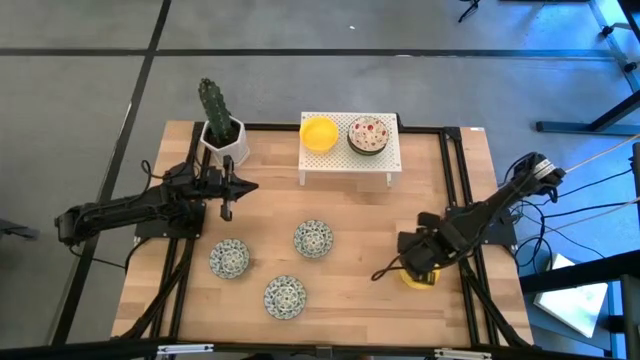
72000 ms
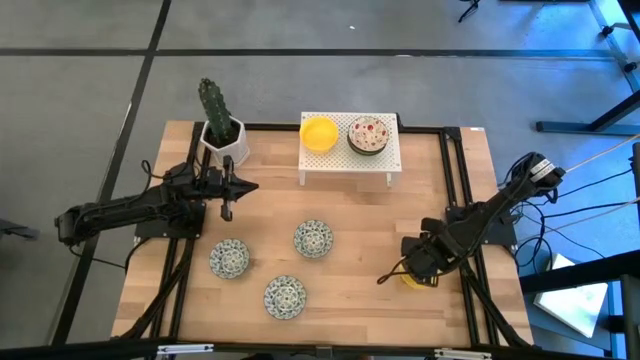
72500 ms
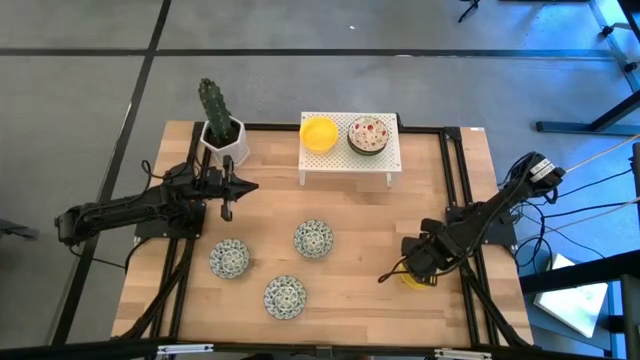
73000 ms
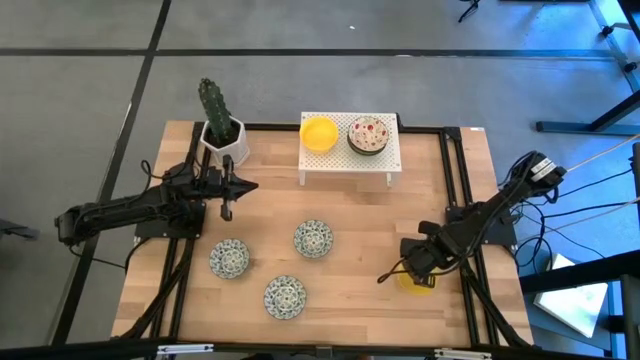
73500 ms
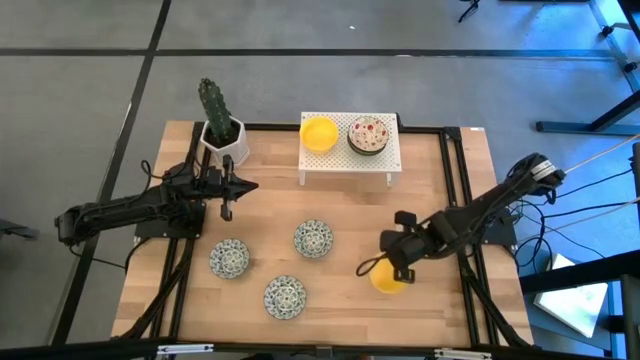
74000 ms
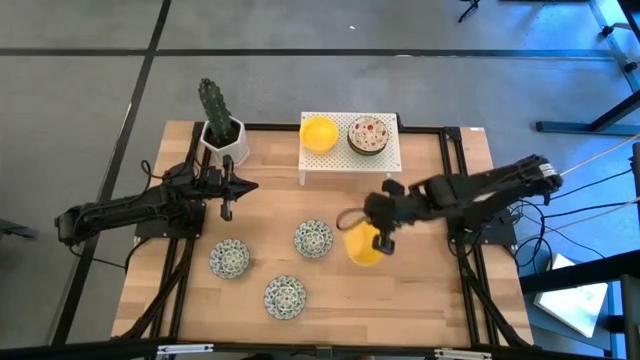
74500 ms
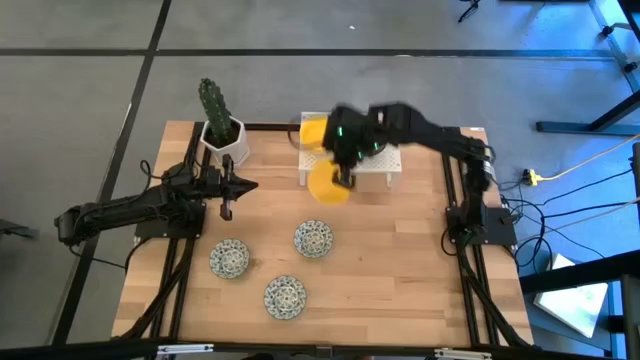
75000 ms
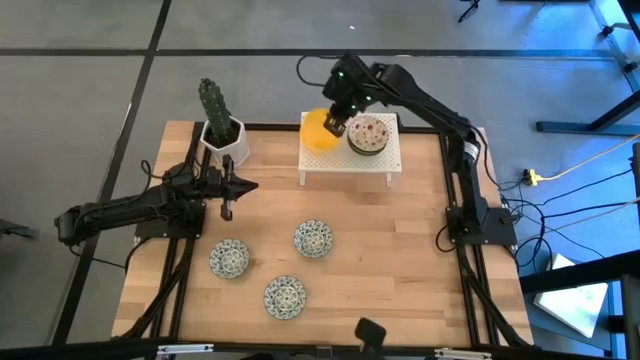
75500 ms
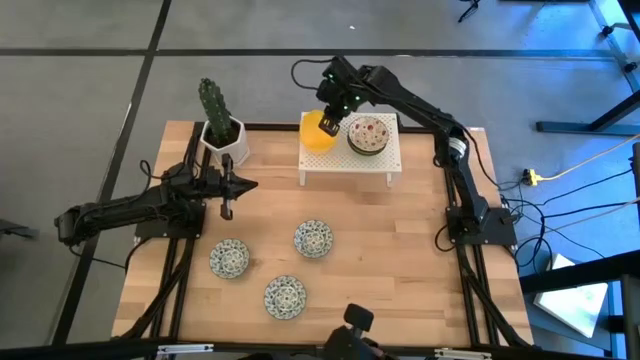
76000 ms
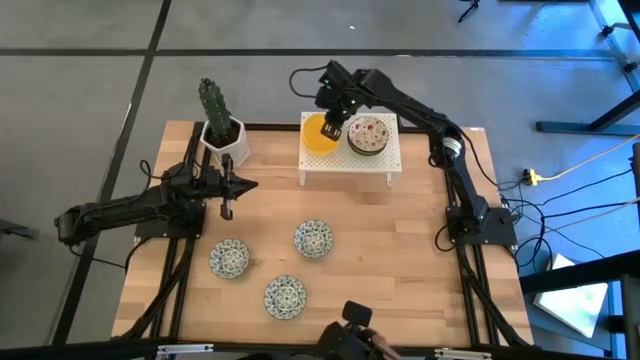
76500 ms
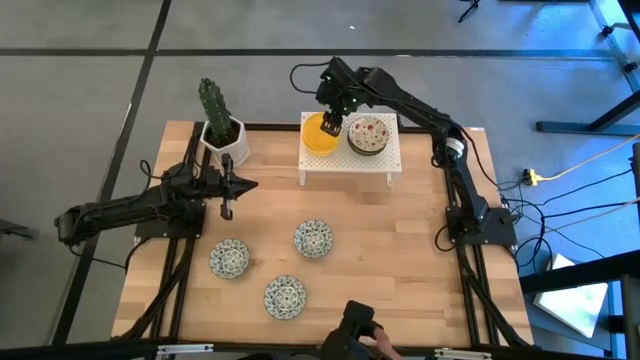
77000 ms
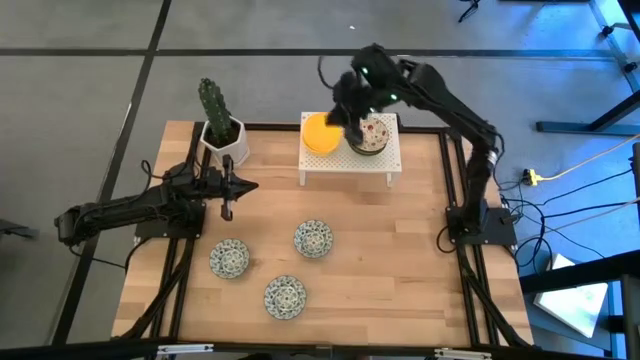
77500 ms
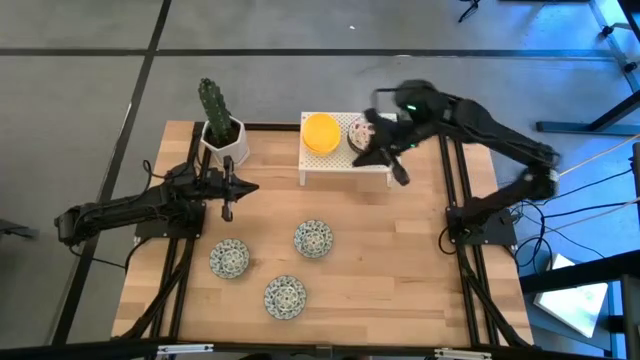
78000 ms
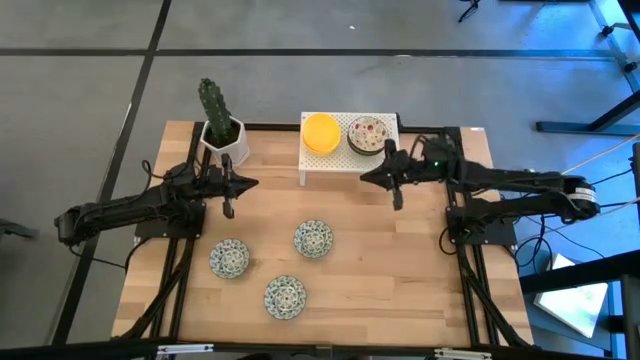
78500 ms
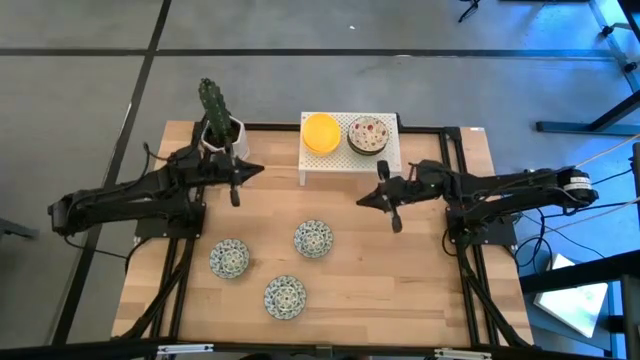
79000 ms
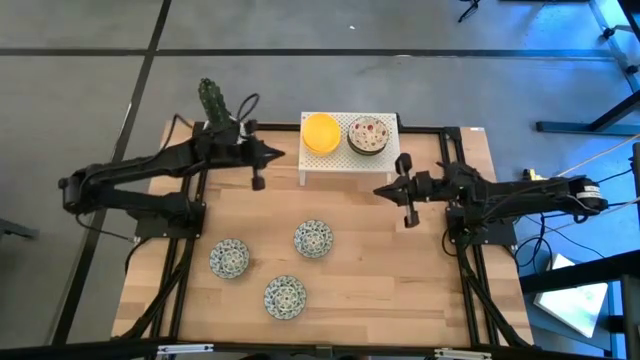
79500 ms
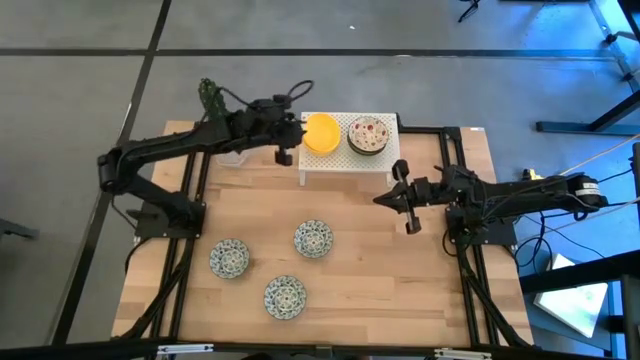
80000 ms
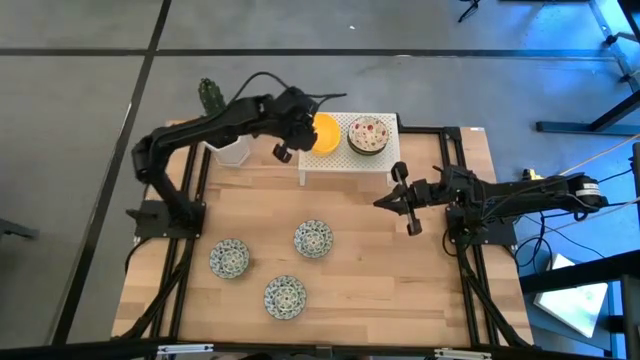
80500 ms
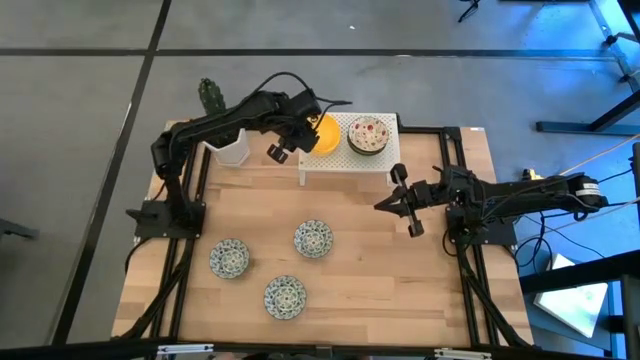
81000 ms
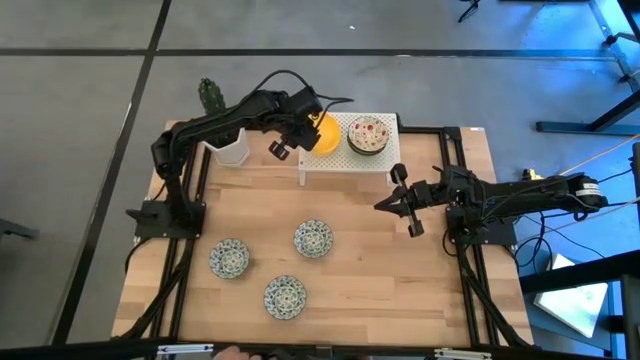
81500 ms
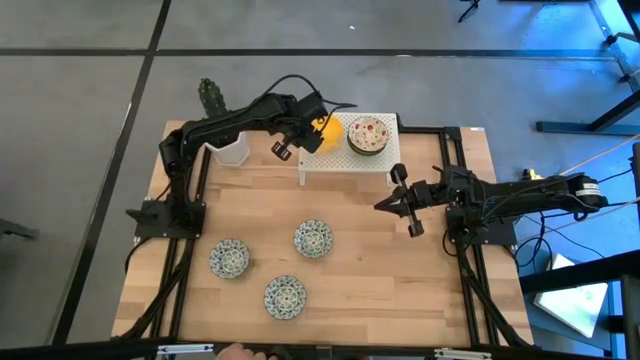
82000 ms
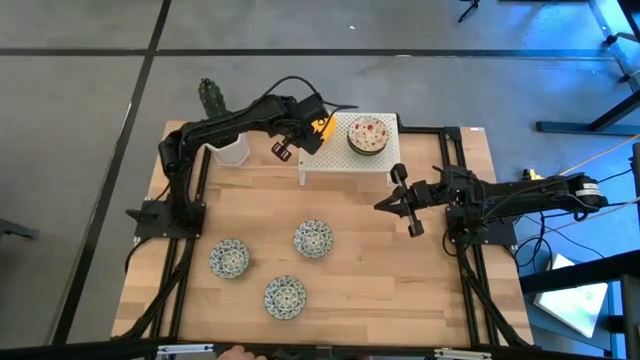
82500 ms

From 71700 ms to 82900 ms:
Task: Pick & Place Mini bowls
Stack the yellow bowl on top of the yellow bowl on the shelf

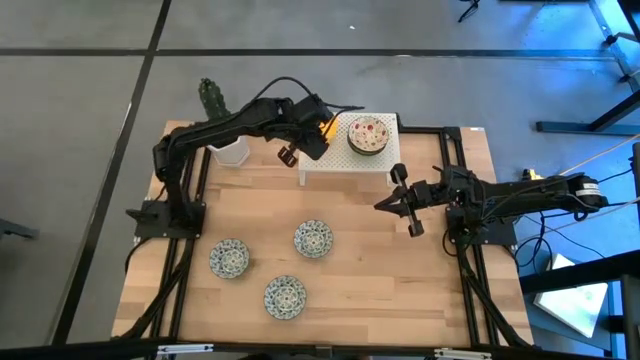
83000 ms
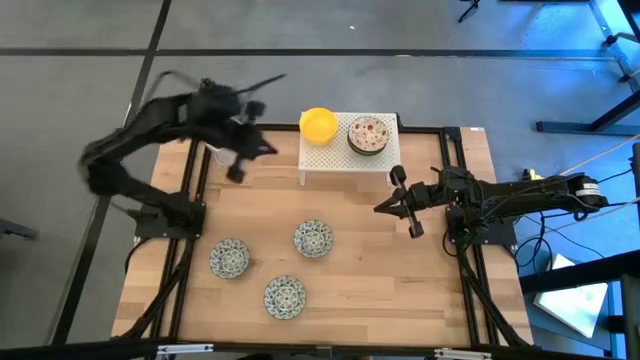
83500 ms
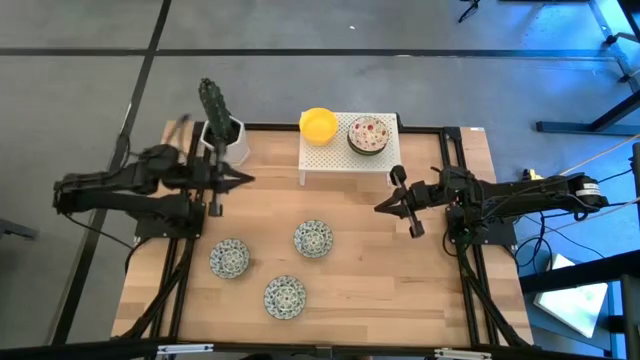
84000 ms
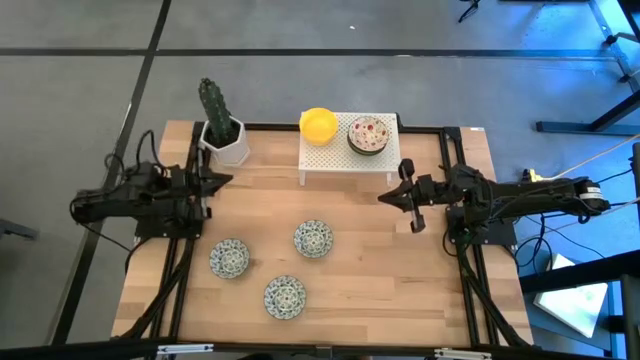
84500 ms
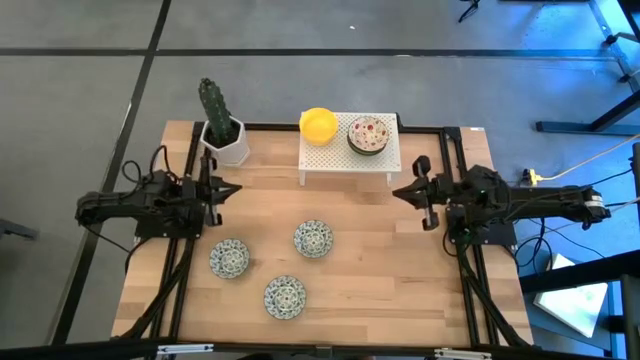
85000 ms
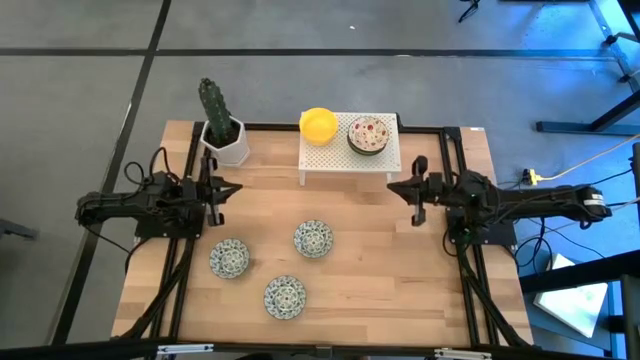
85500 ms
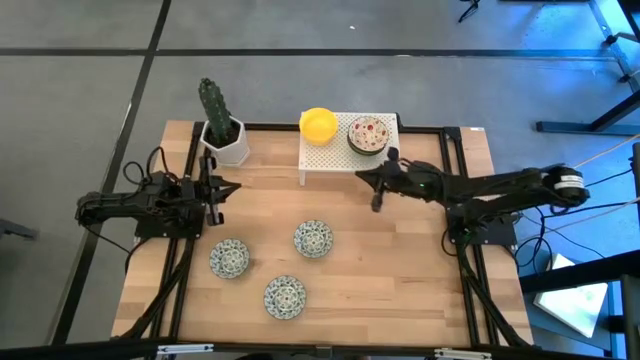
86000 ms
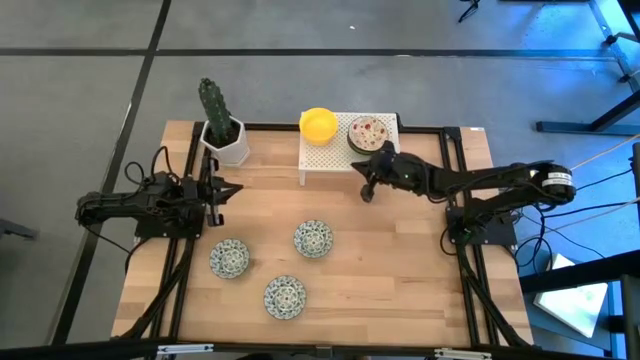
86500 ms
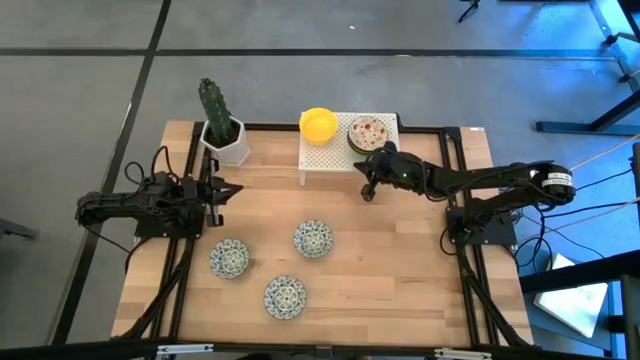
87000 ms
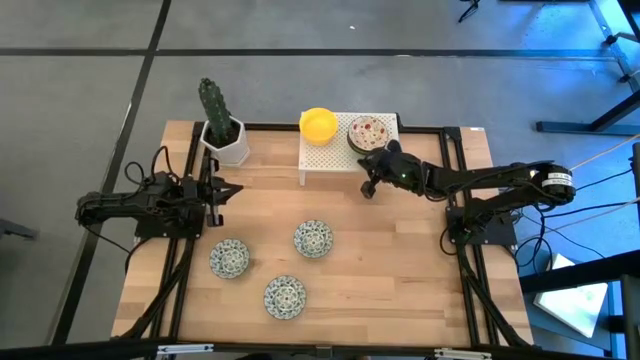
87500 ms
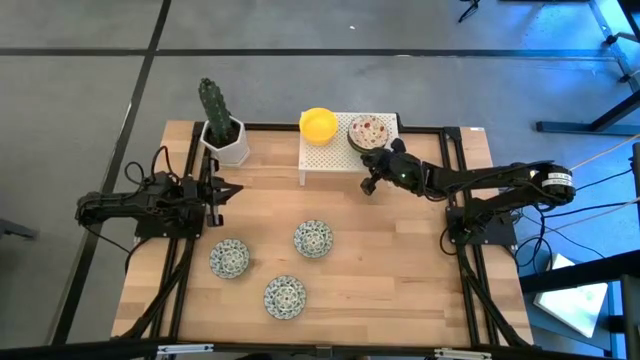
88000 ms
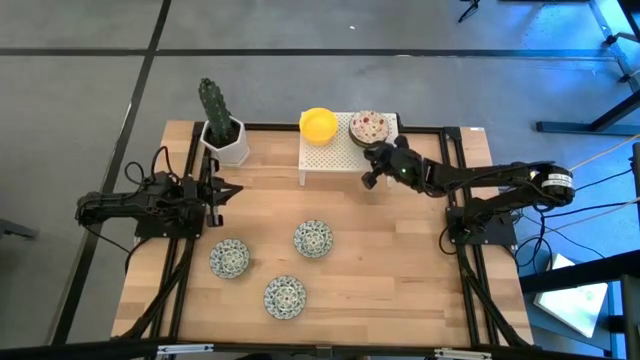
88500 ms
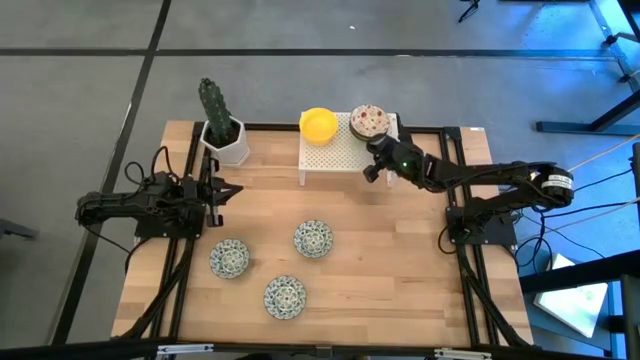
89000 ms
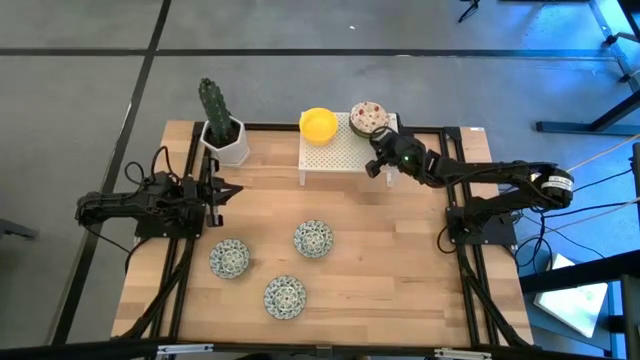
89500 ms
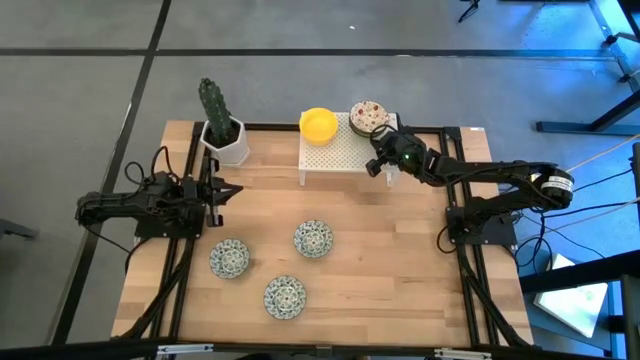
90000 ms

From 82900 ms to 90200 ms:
Adjust the stacked green bowls on the shelf

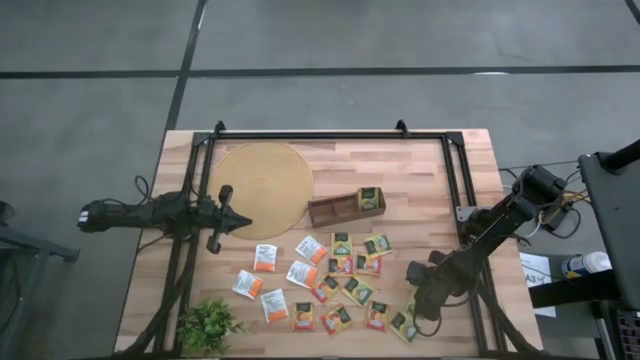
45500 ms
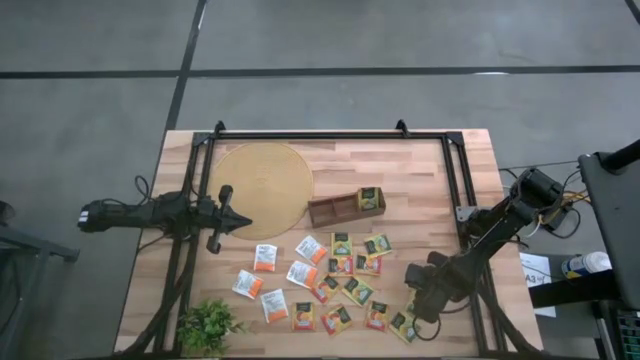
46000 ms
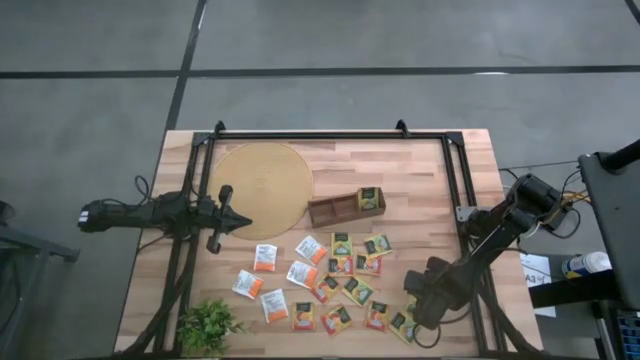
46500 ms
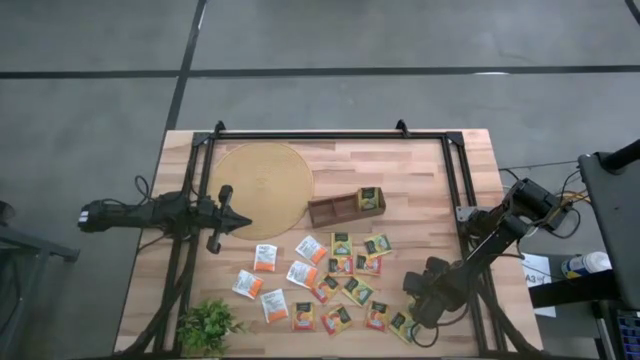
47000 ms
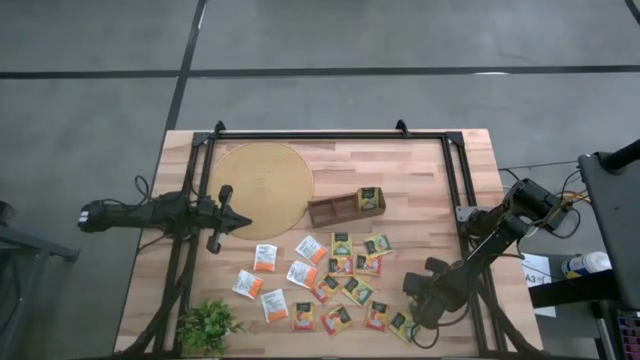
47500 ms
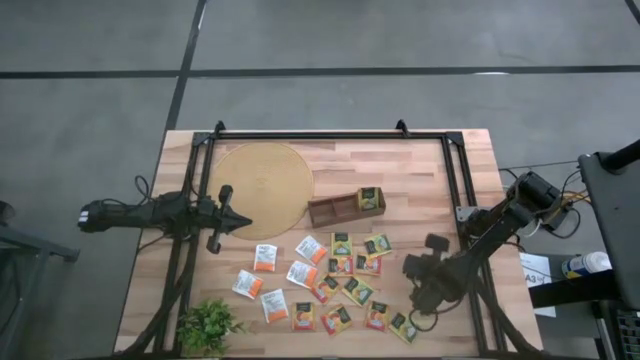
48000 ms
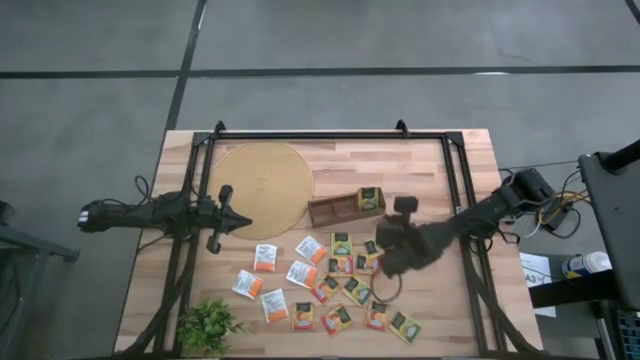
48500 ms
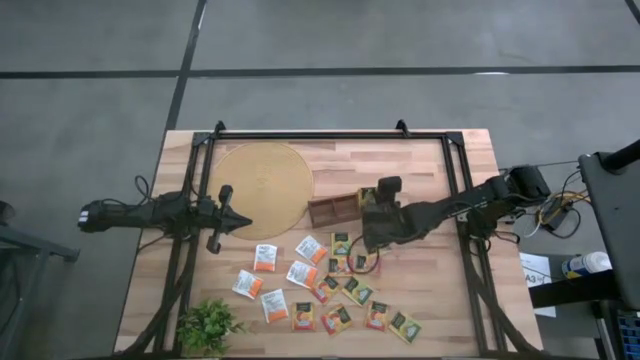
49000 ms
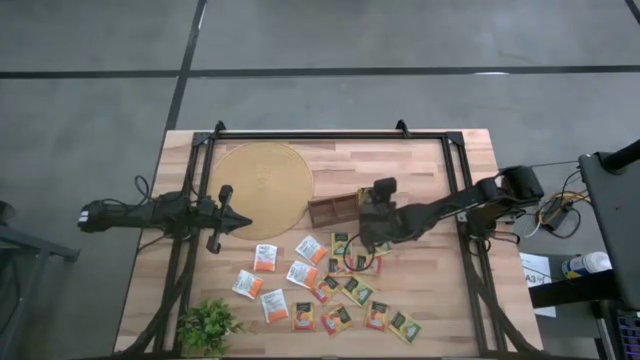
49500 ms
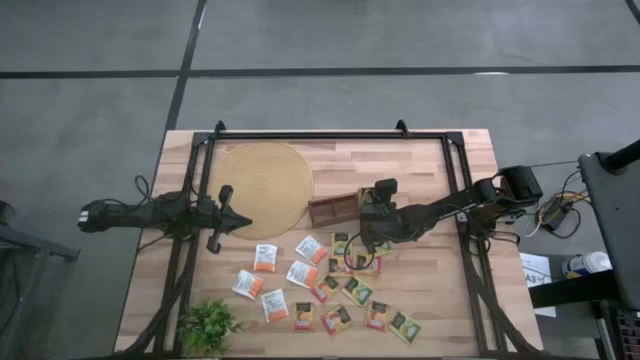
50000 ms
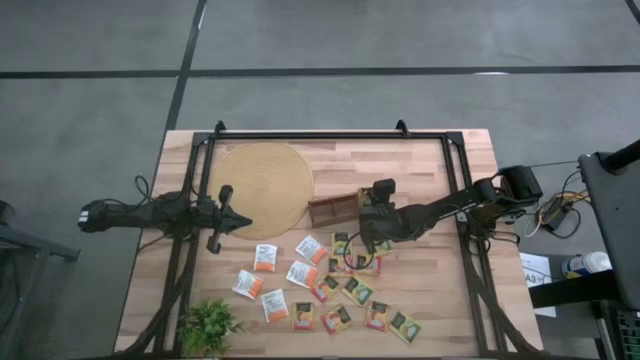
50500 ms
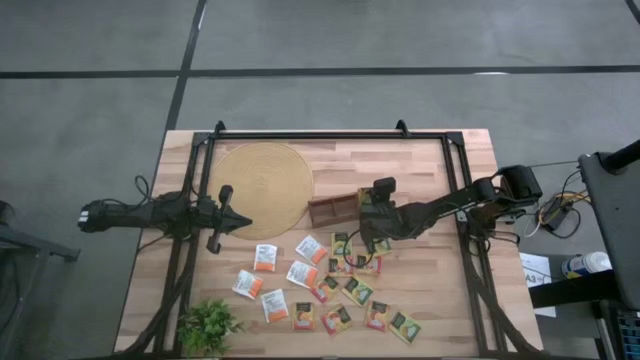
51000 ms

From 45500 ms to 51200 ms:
Task: Pick & Place Tea
Put the yellow tea bag into the right section of the wooden organizer
